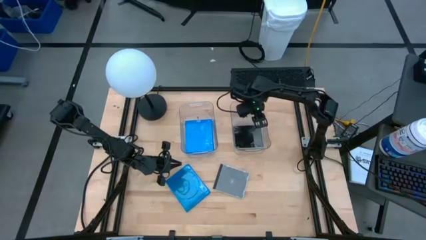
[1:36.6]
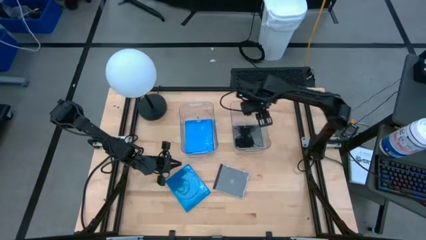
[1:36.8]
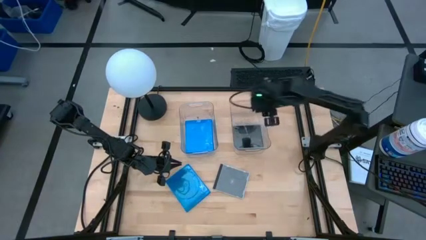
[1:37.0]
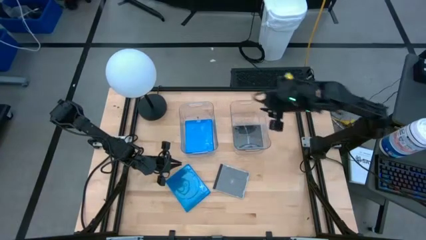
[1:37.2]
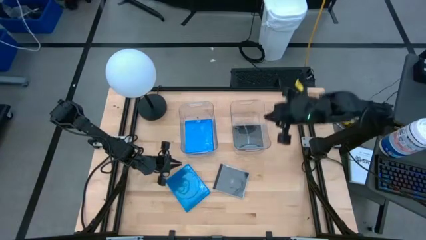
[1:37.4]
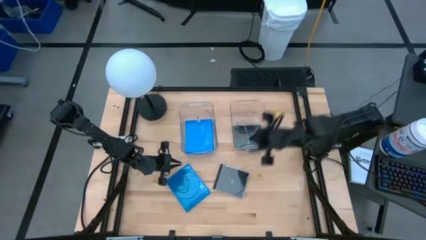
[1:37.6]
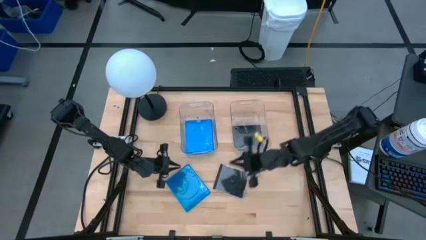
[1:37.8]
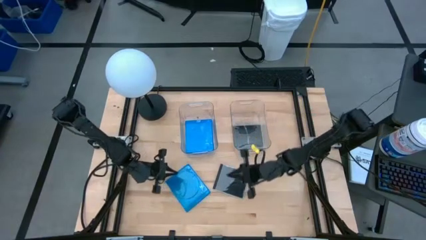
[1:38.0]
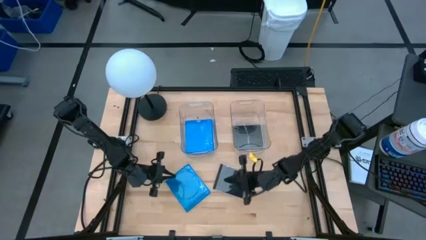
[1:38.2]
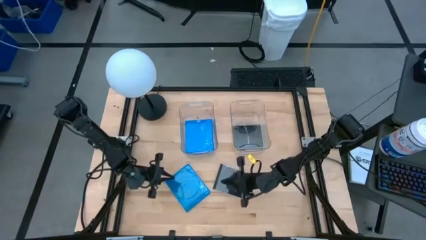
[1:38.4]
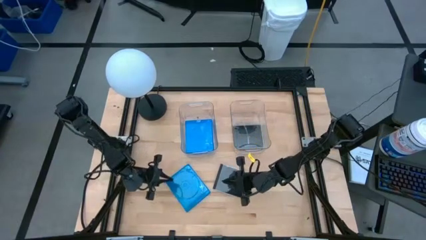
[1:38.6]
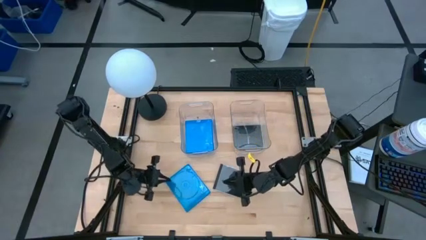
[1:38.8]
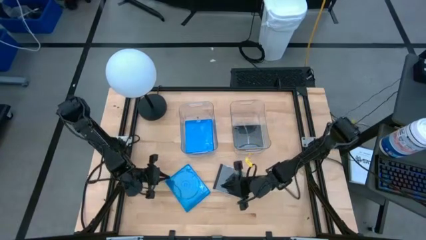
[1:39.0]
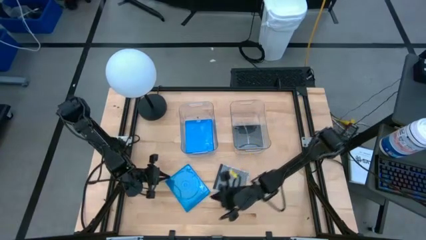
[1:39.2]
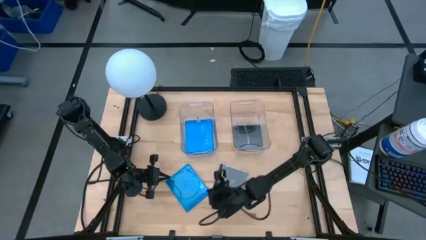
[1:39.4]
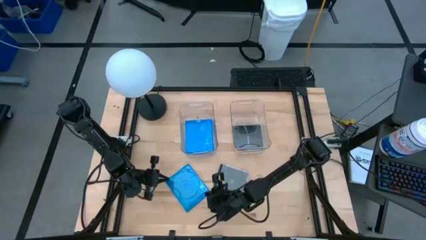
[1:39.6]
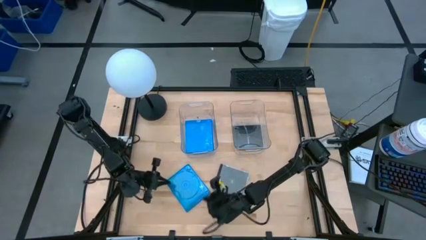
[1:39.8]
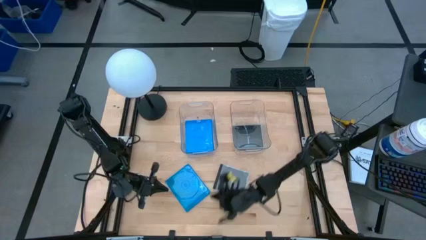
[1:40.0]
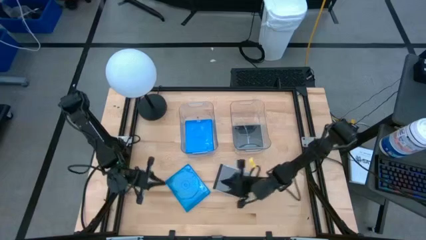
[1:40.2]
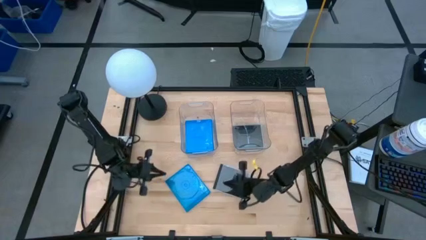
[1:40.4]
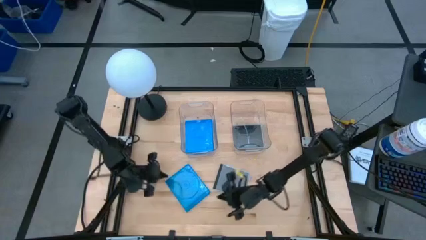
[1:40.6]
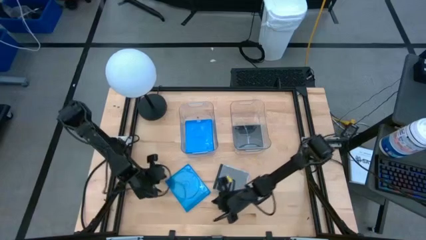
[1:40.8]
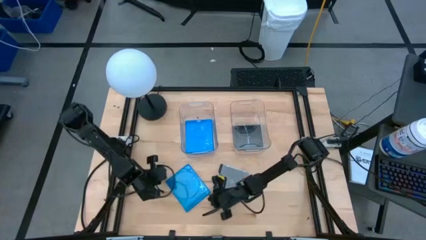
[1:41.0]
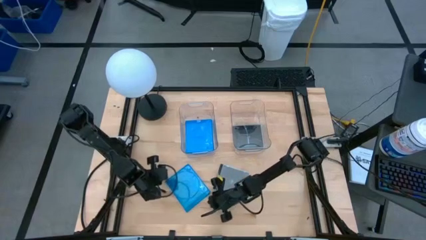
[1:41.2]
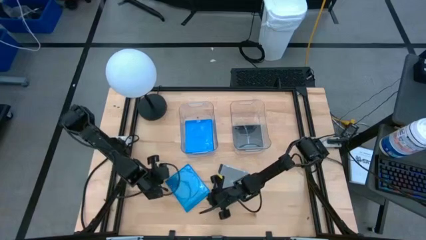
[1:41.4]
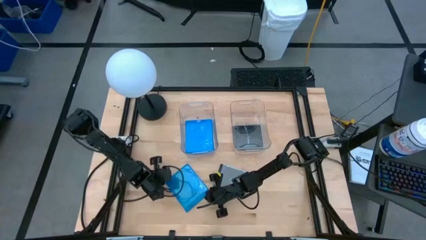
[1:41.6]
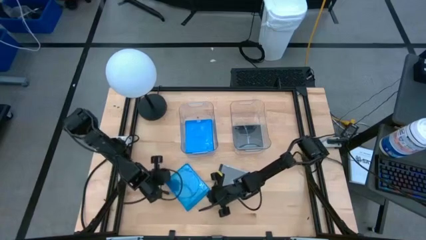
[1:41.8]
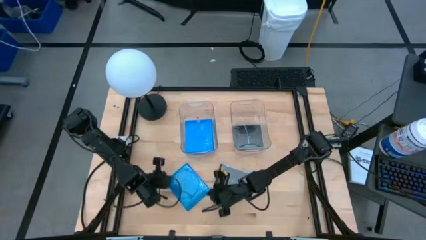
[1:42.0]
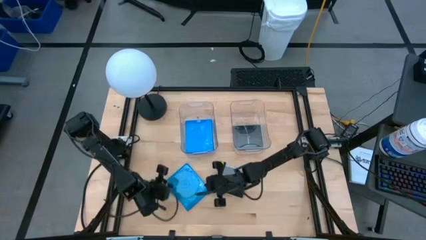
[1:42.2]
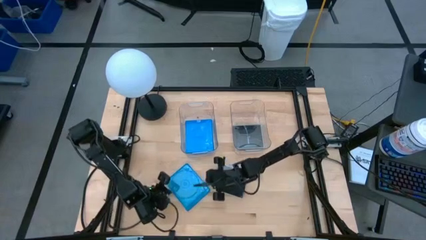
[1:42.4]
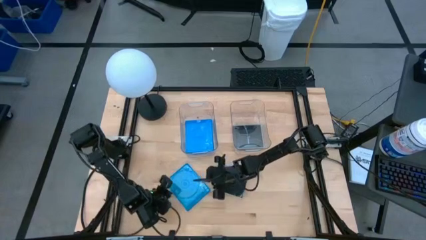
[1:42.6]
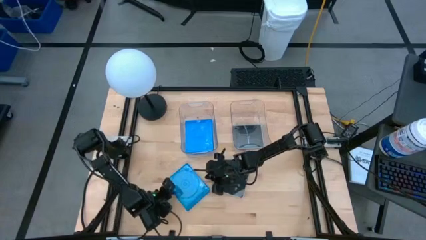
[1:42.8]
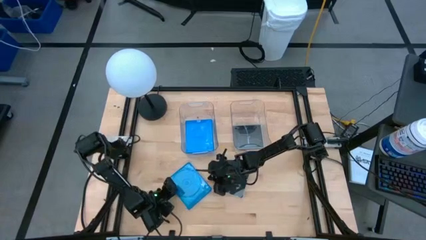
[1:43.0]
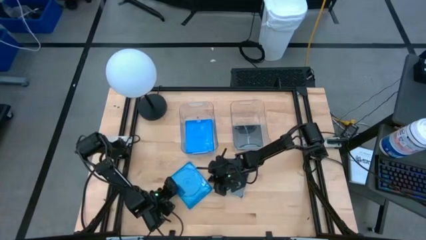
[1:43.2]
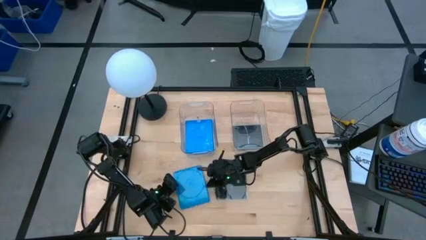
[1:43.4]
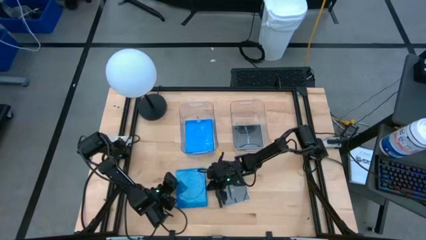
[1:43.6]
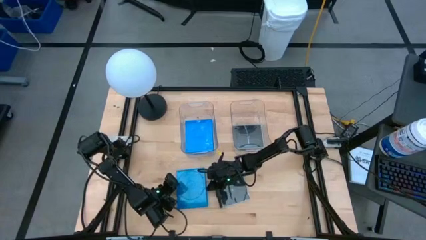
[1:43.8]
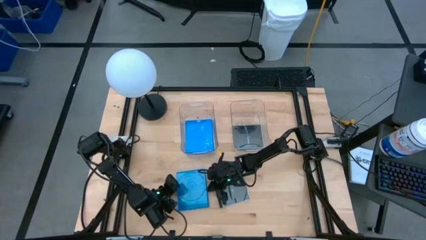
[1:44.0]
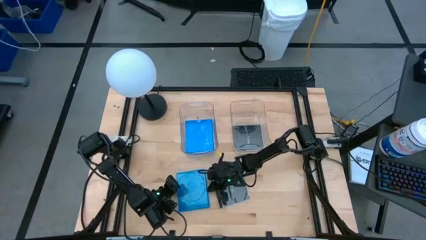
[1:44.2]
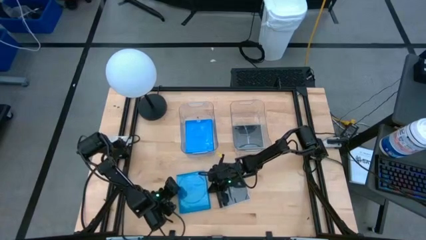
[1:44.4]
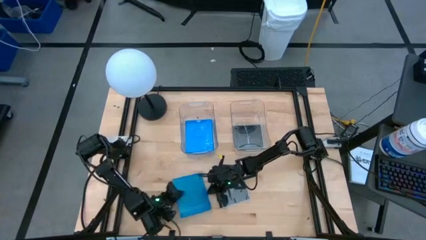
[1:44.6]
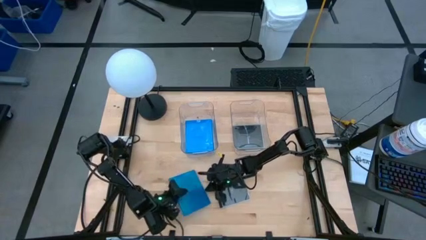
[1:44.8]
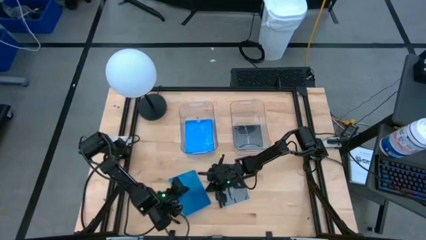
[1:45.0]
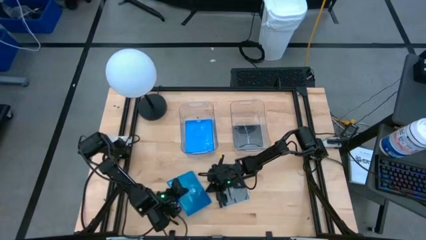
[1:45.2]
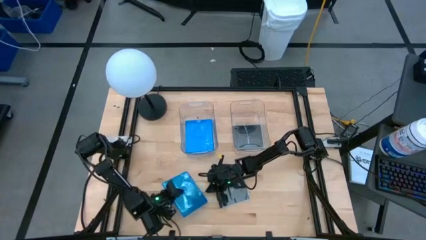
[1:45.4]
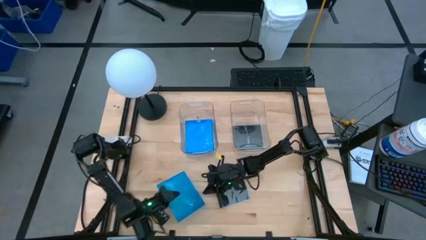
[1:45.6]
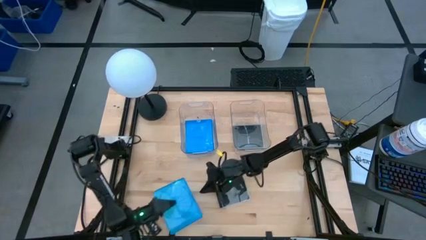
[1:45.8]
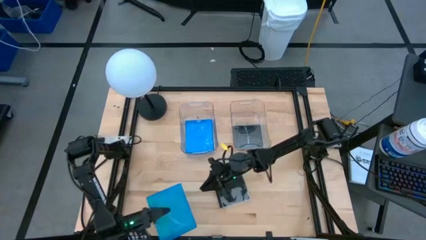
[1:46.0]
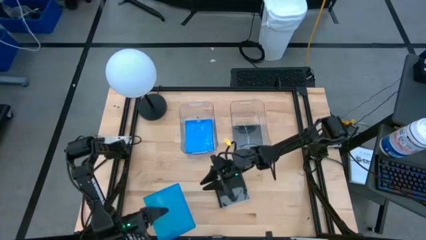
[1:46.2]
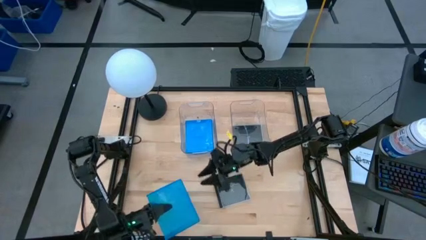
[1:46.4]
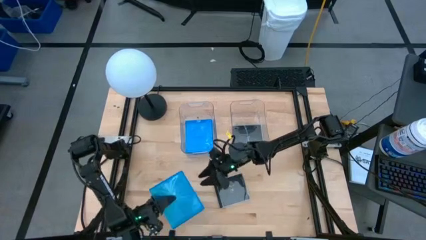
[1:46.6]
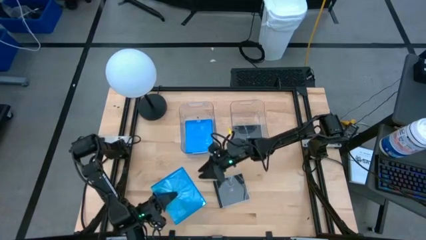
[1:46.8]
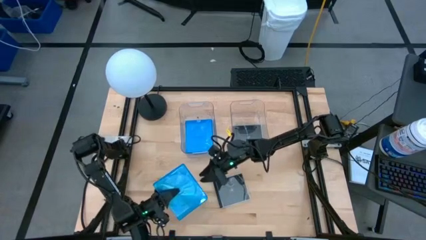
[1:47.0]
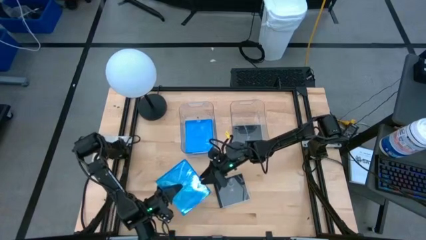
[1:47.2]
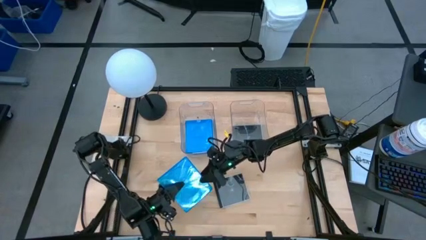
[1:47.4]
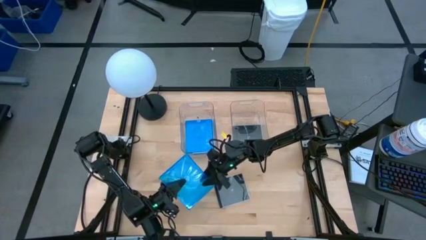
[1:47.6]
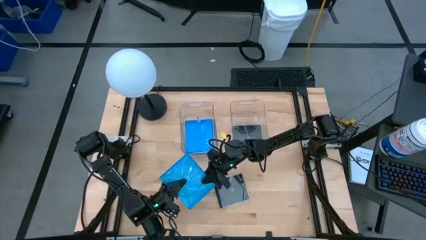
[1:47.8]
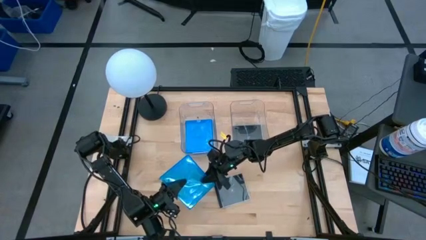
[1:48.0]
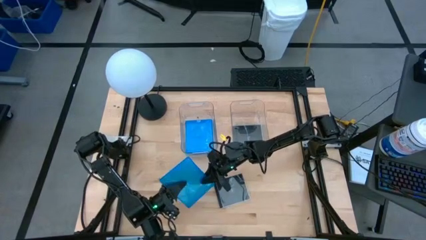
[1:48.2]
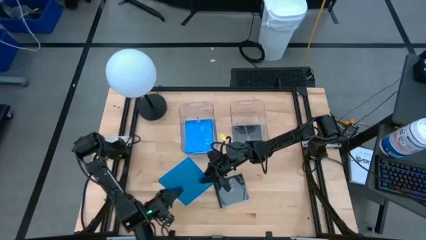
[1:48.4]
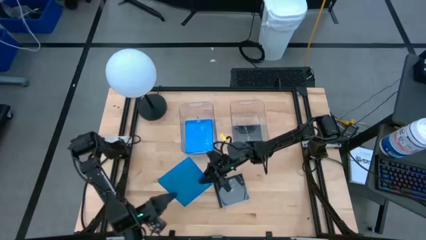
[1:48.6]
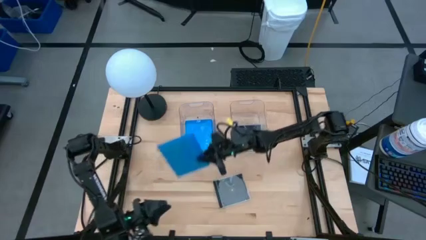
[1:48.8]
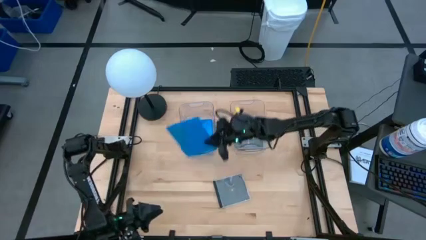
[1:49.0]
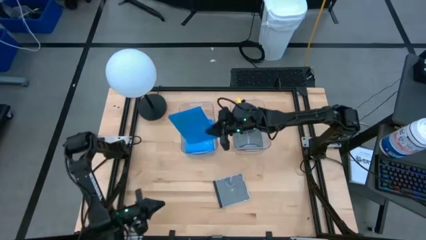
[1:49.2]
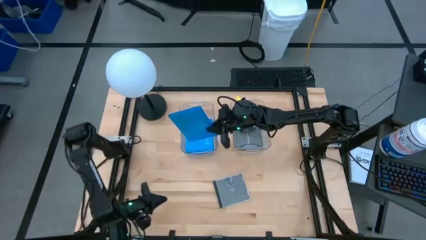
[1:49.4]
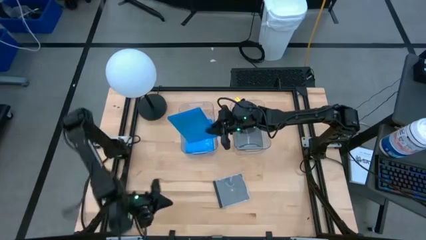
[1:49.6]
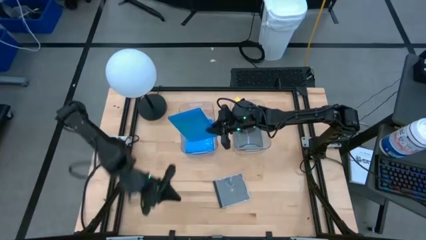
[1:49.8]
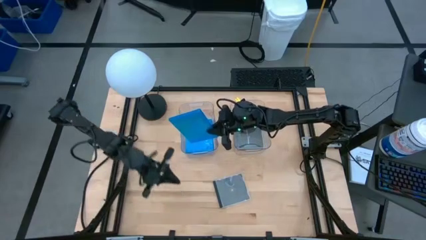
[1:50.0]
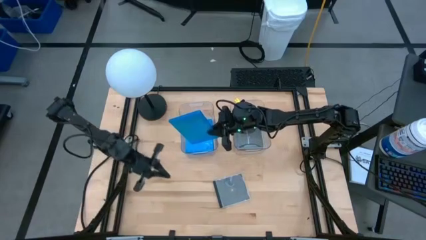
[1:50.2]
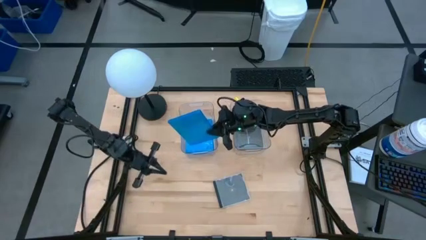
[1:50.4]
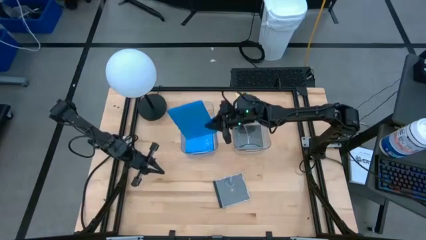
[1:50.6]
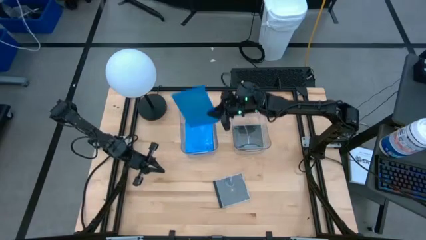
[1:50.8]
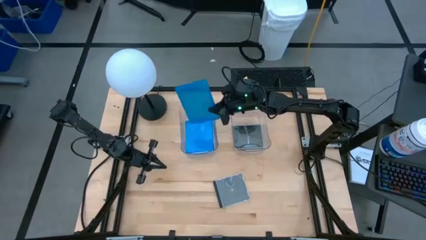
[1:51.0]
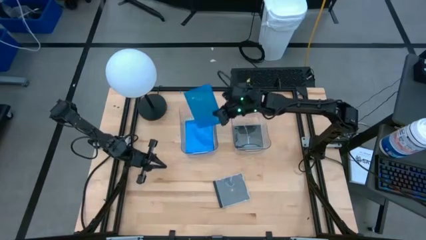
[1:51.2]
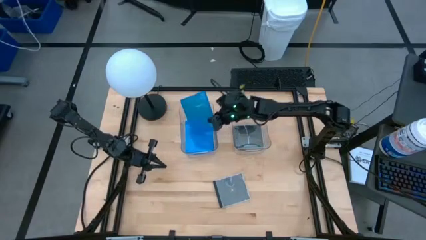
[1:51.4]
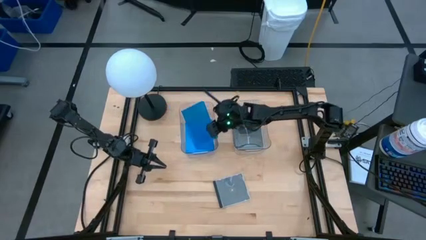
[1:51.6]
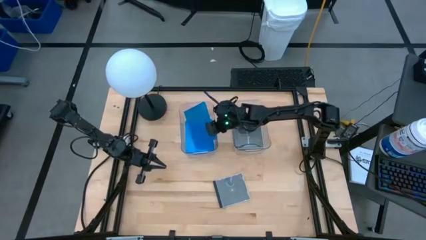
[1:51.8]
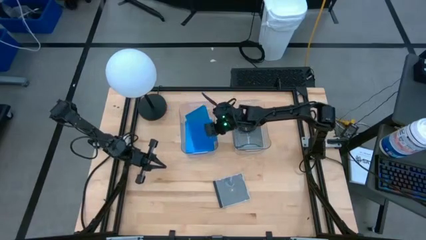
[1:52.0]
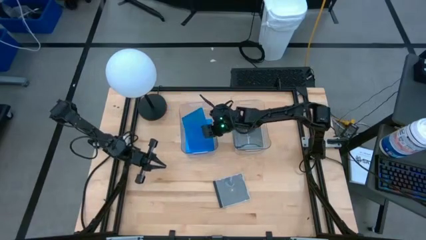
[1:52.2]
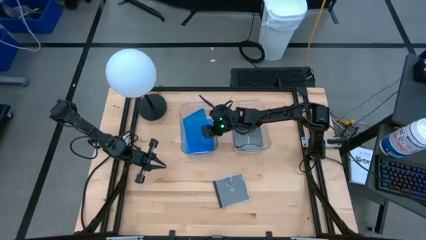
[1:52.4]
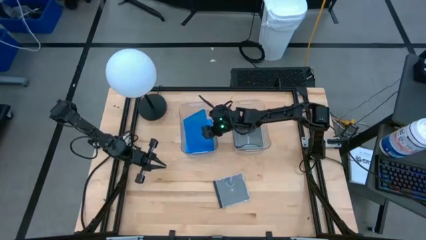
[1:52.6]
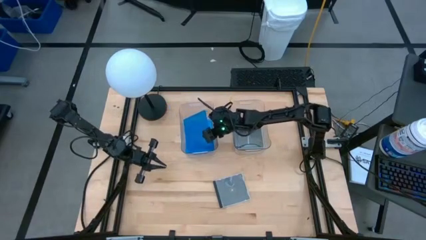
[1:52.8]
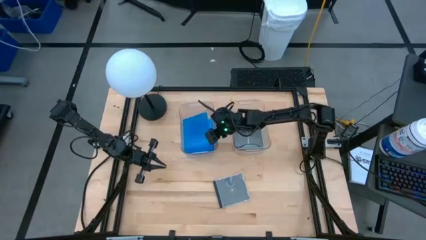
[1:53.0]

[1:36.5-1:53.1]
Task: Pick & place jewel cases by type
Put the blue cd case into the left transparent bin
